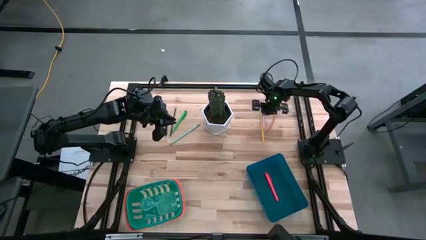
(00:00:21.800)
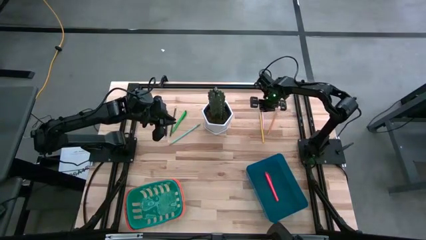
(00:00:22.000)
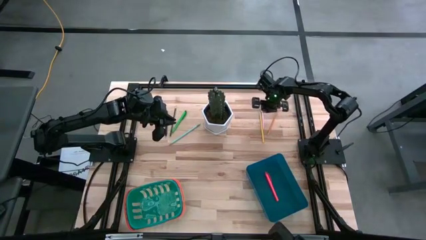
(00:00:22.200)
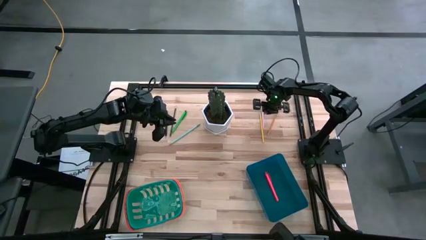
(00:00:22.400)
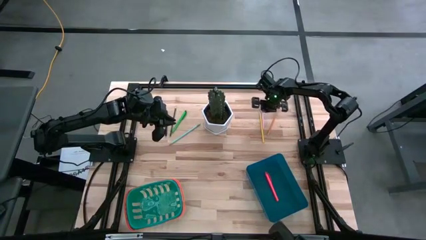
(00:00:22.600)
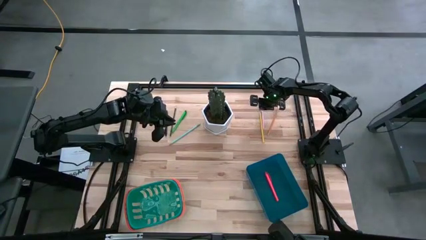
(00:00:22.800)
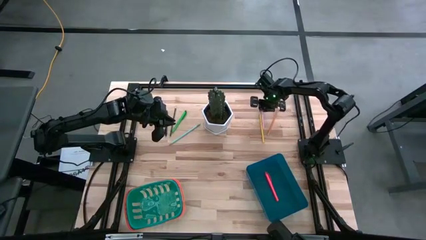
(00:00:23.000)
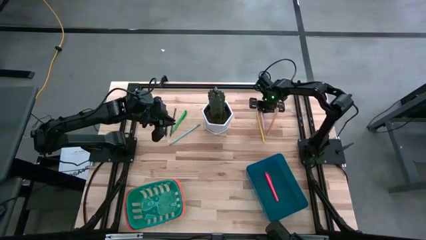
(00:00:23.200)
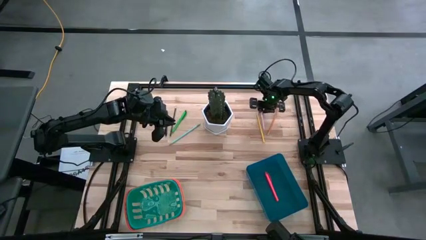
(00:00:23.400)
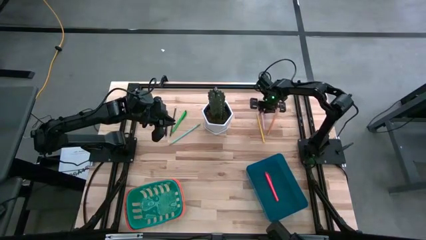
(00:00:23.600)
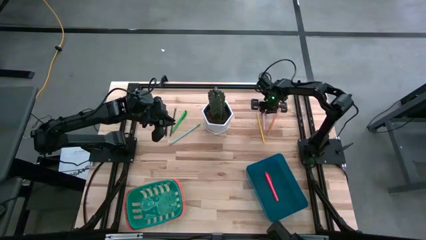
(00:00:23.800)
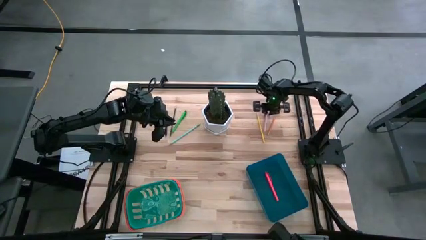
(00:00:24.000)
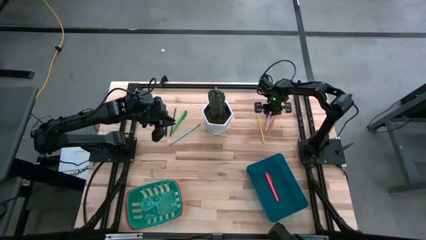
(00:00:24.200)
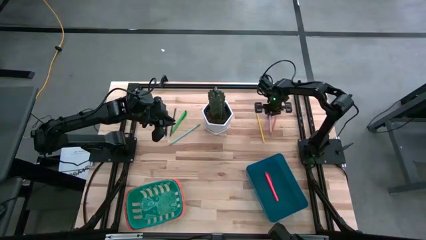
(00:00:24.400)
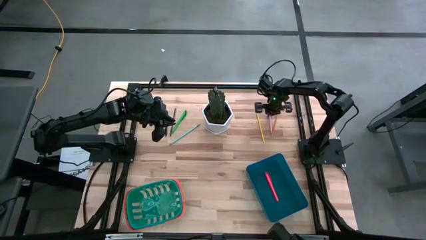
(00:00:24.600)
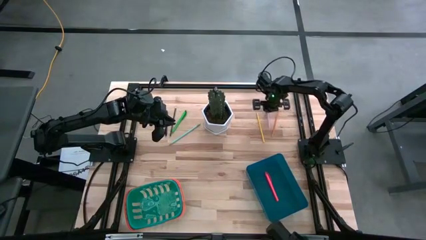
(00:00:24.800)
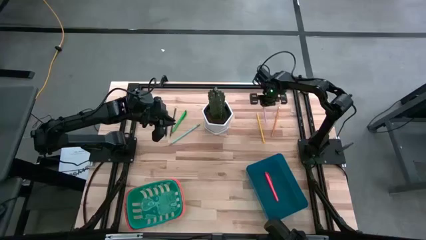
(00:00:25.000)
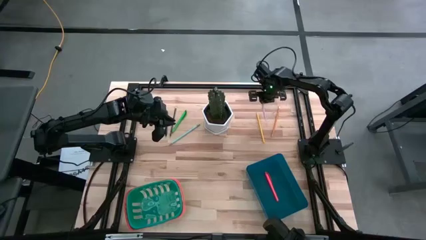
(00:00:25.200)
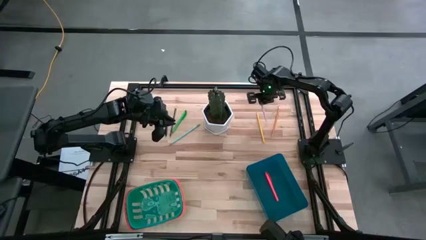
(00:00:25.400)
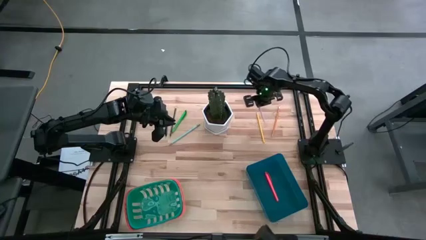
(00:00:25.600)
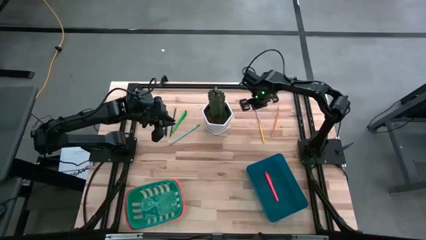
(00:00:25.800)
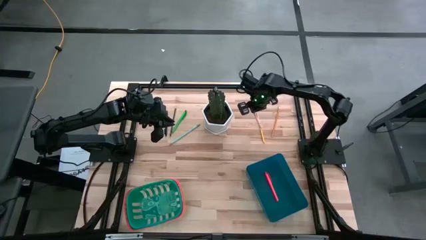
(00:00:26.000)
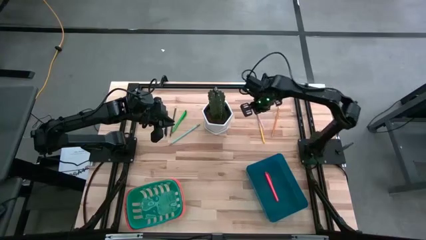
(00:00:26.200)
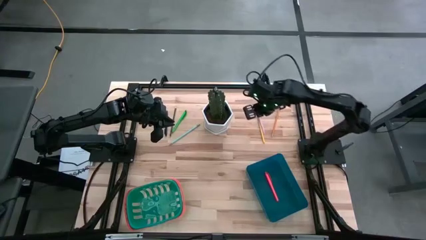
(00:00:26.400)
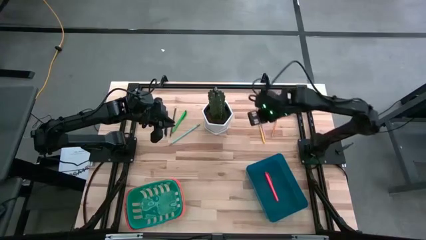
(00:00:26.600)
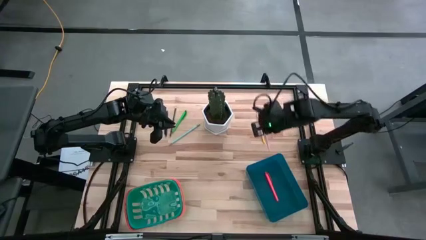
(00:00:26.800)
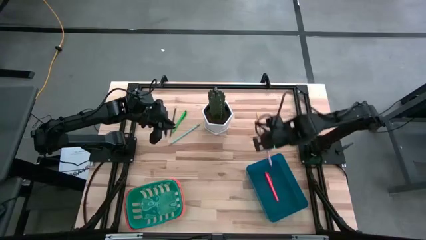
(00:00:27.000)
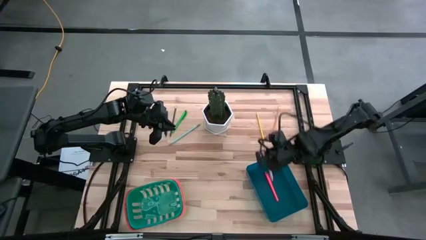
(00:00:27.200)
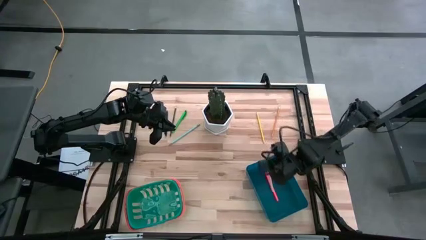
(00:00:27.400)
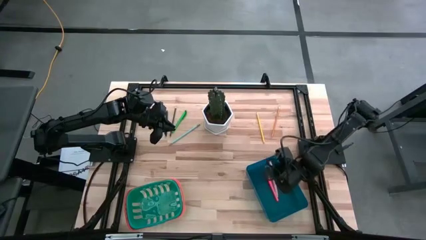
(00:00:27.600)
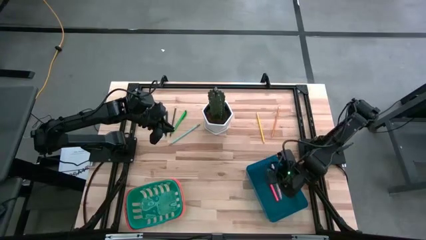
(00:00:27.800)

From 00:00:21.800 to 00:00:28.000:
Task: Sort pens & pencils
Put the pink pen into the blue bin

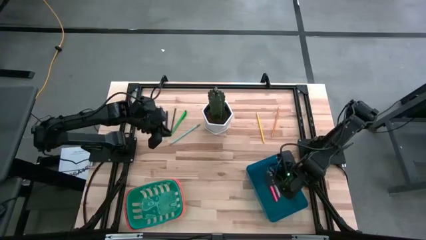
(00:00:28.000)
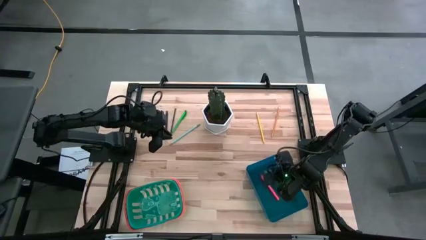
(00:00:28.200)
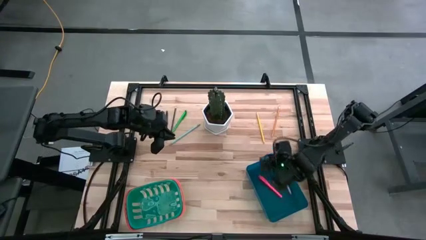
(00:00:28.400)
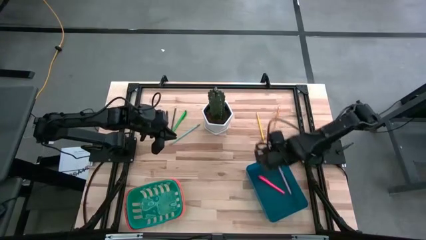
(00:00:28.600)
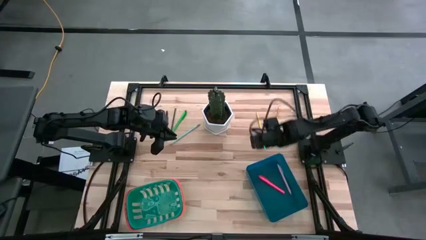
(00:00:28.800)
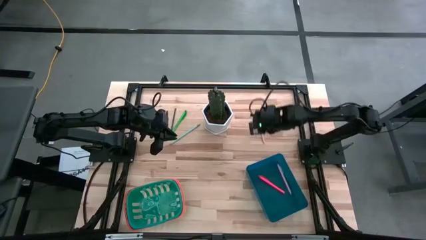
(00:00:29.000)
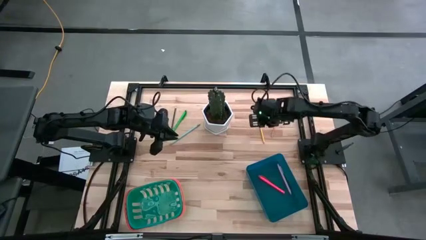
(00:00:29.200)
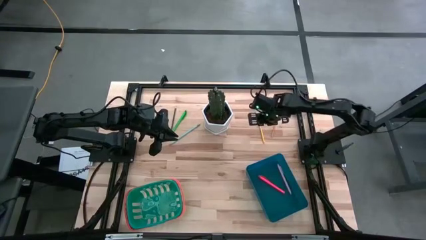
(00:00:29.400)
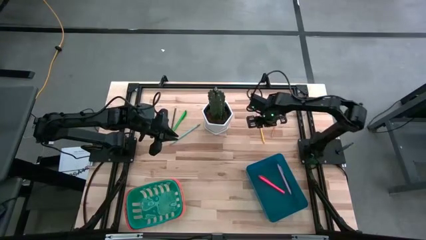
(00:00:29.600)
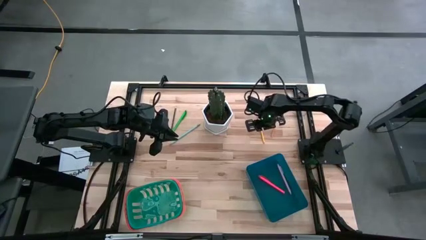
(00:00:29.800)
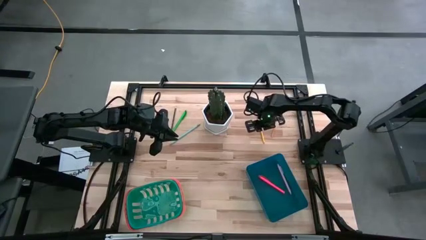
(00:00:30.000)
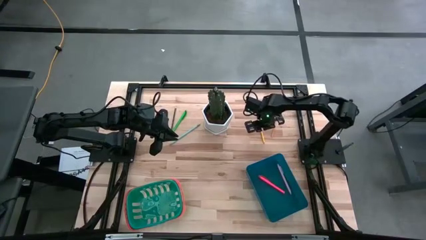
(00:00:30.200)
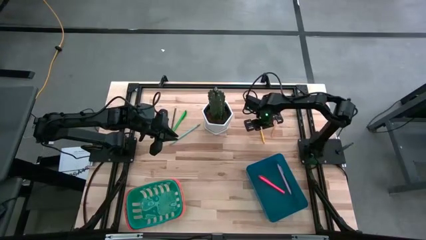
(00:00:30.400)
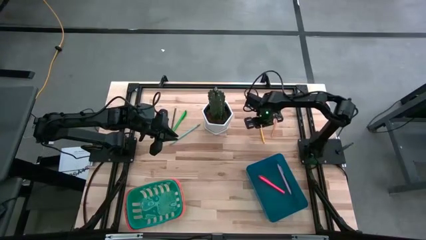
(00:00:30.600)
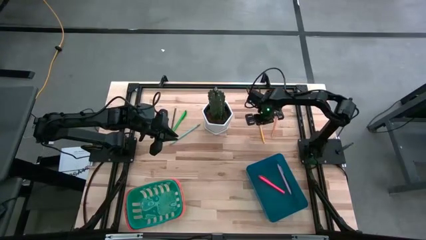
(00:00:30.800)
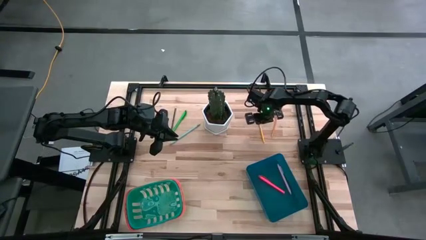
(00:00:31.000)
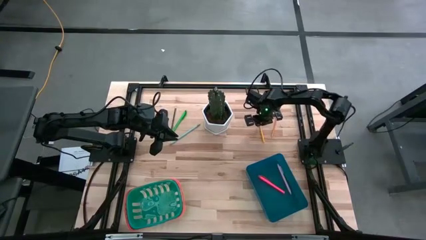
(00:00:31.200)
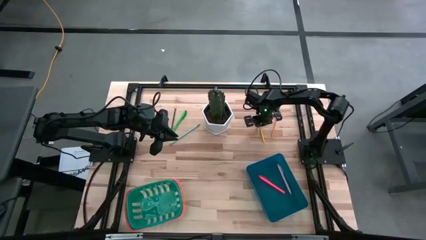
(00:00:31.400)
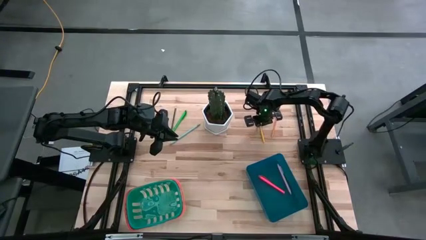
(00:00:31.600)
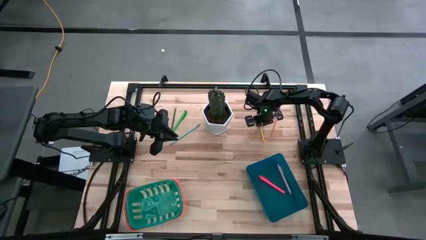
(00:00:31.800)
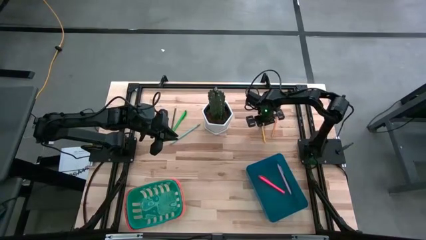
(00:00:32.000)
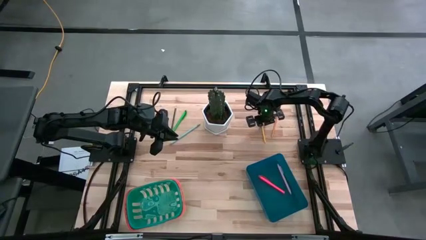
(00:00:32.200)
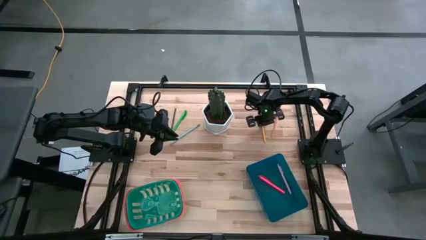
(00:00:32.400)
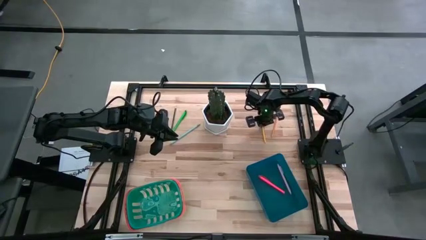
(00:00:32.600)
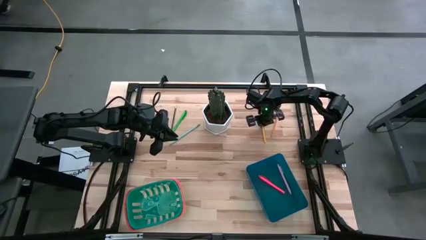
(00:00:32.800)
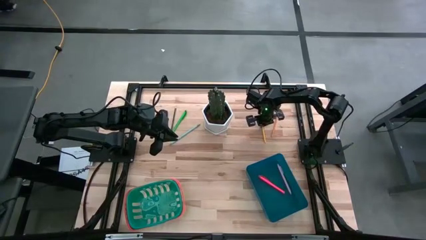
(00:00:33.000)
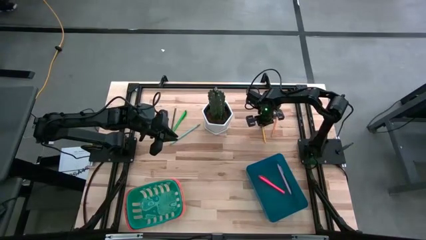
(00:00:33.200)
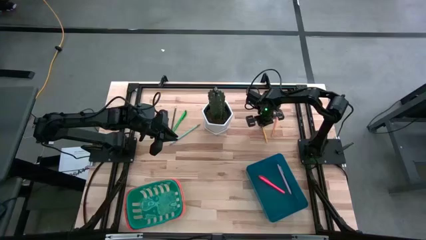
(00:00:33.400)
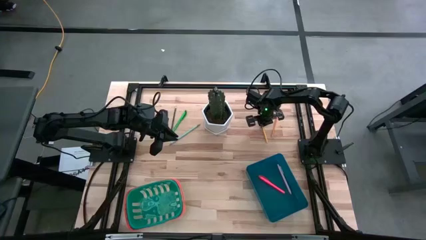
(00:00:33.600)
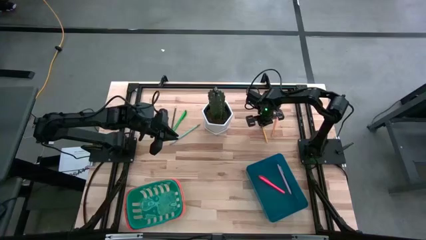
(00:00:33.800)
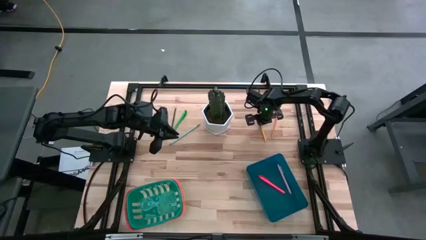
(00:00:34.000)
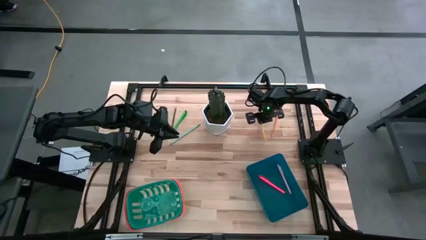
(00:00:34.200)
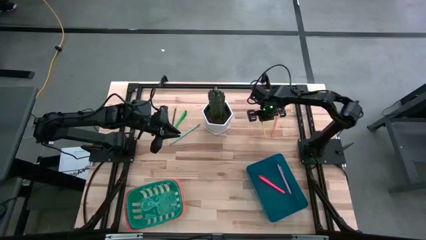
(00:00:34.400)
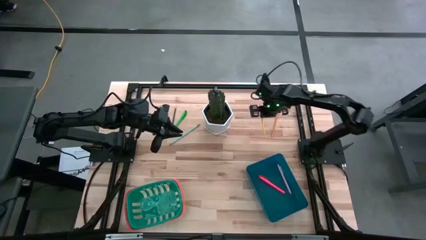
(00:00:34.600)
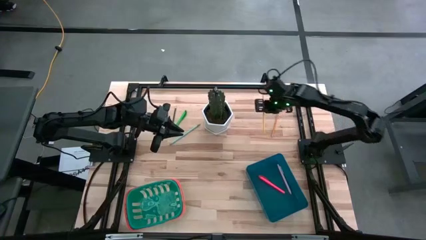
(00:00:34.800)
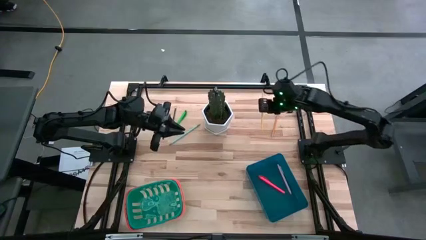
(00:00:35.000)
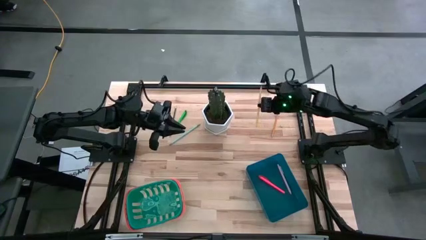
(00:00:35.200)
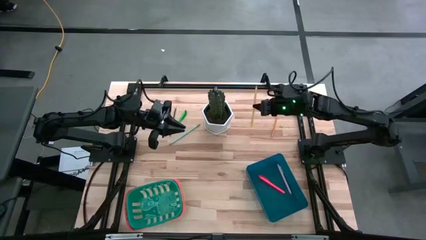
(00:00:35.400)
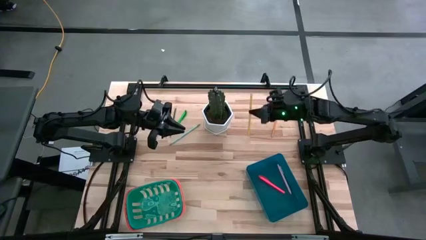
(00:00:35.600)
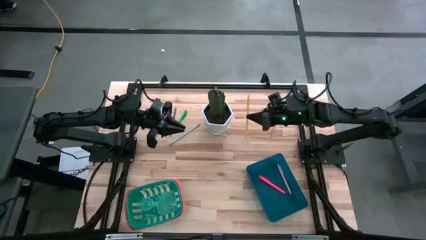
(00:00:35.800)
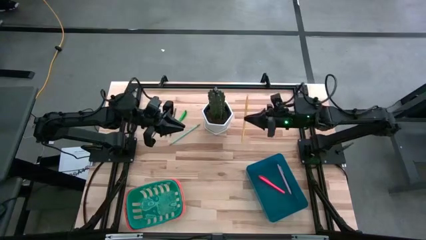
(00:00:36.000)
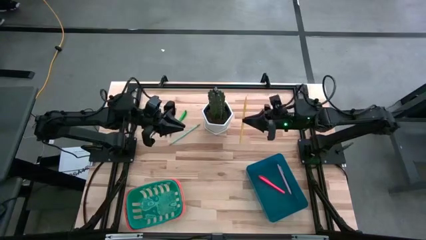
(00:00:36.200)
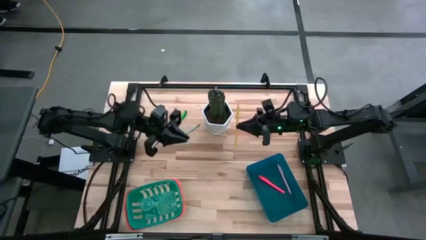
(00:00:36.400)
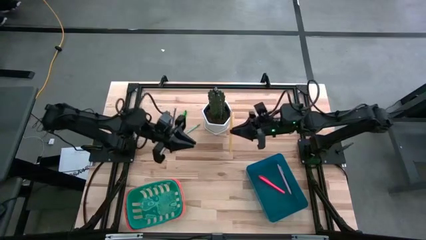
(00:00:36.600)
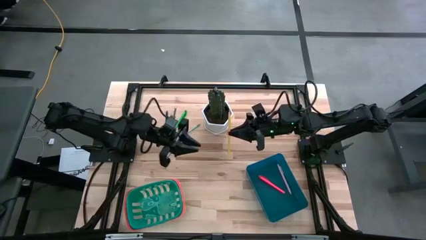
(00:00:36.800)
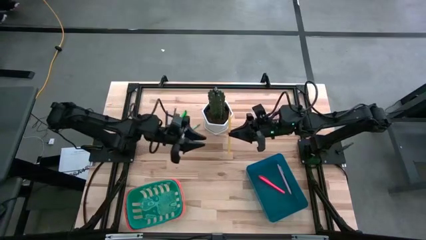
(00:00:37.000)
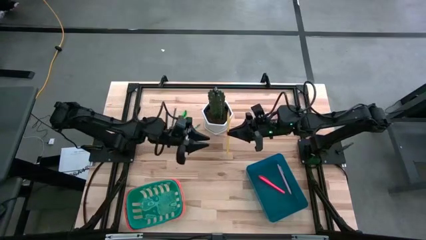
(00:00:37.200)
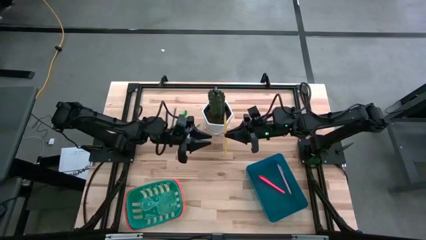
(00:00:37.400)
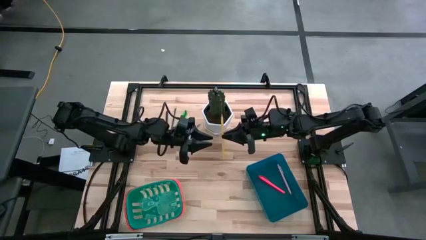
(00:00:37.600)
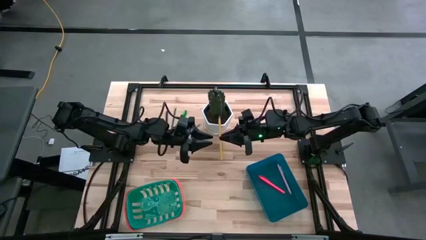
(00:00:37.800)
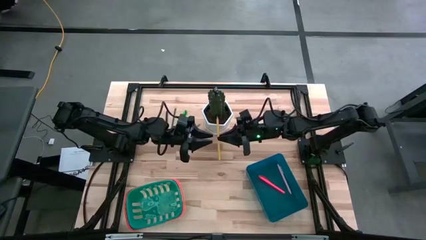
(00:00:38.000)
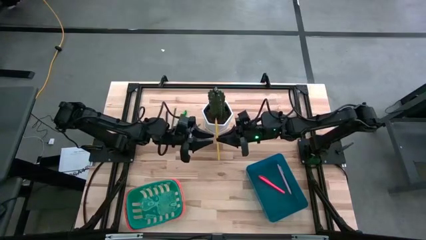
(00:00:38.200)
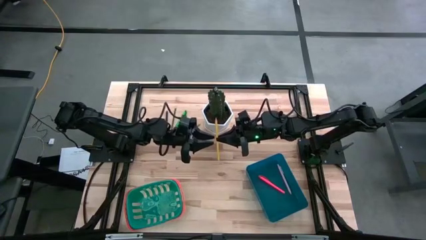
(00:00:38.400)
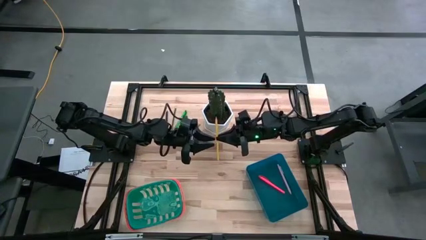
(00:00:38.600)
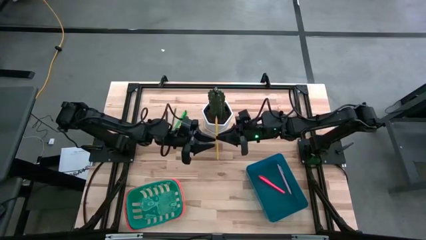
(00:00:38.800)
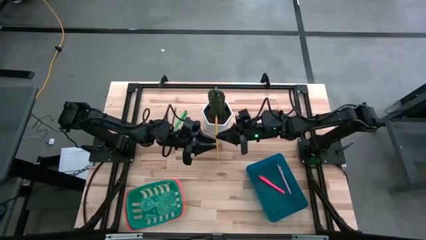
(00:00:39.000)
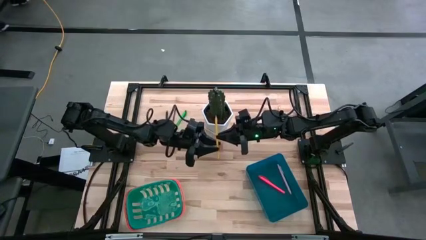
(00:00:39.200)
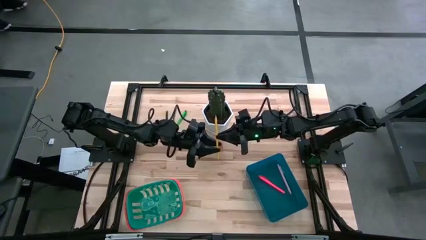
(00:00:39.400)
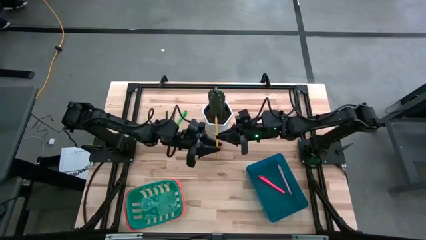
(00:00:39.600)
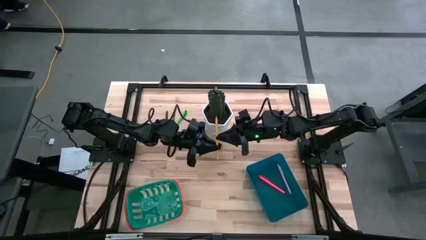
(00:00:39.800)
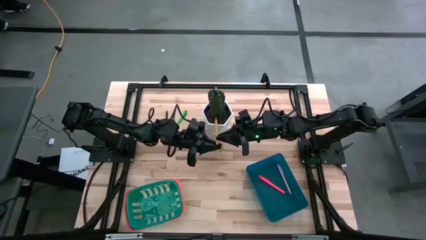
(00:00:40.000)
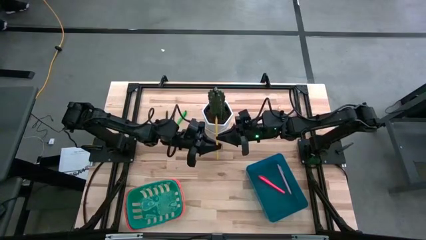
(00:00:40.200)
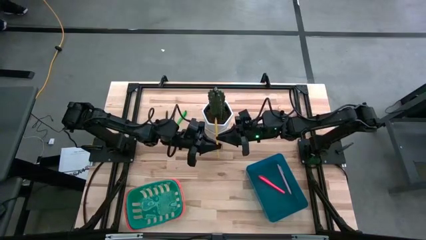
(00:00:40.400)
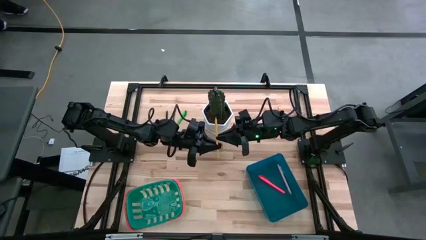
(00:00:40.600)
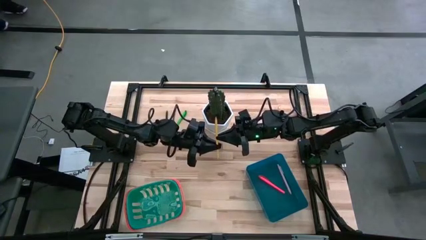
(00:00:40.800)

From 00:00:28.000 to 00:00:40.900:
Put the yellow pencil into the green bin
